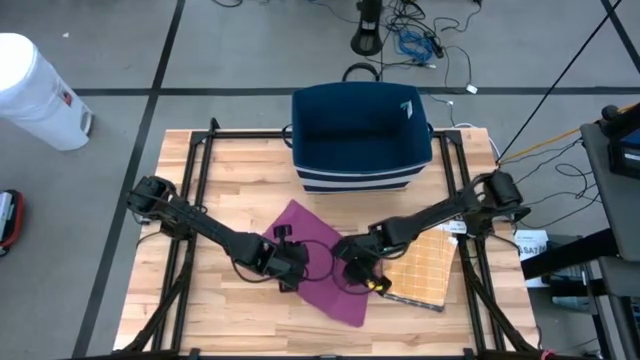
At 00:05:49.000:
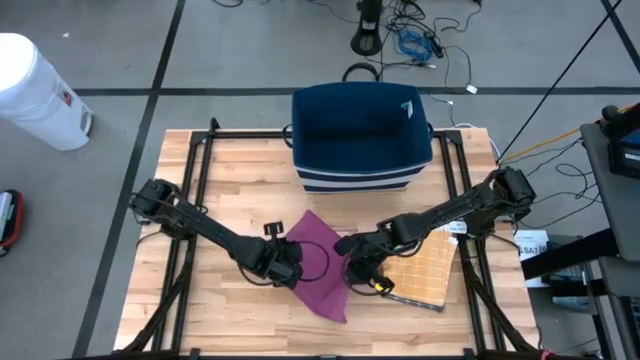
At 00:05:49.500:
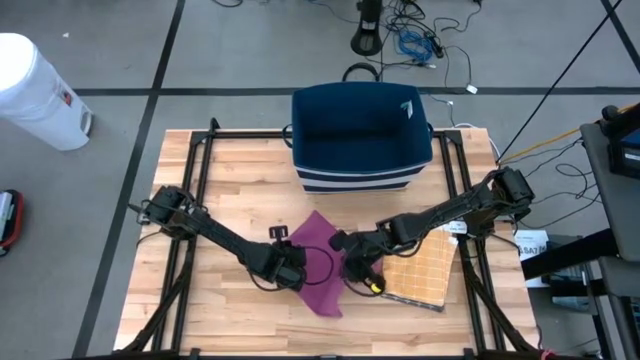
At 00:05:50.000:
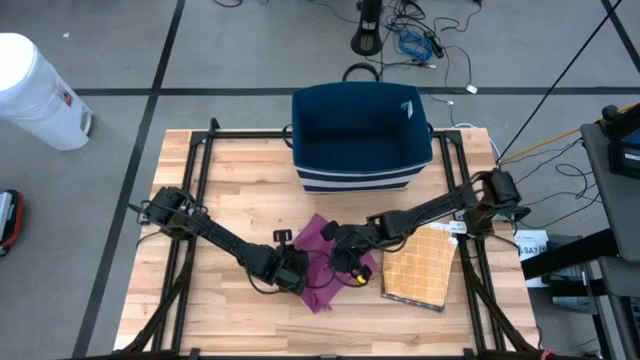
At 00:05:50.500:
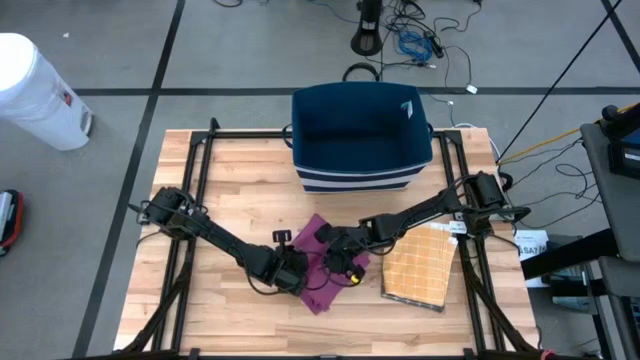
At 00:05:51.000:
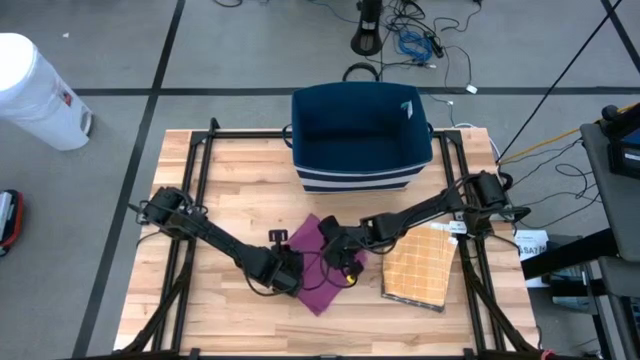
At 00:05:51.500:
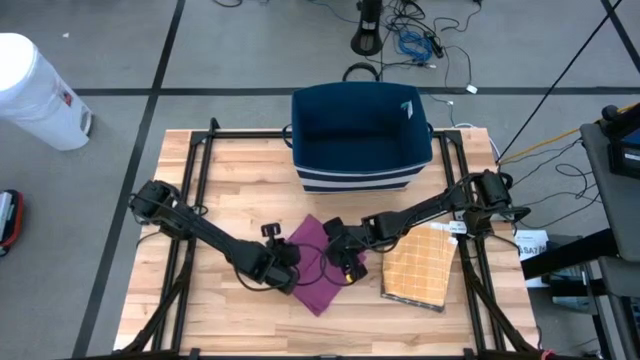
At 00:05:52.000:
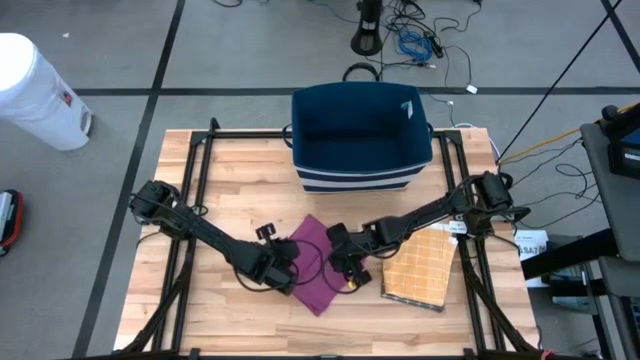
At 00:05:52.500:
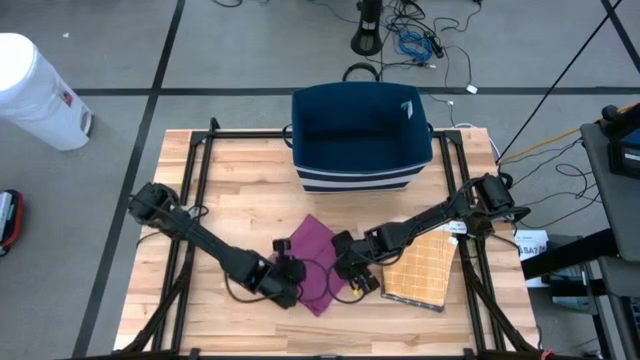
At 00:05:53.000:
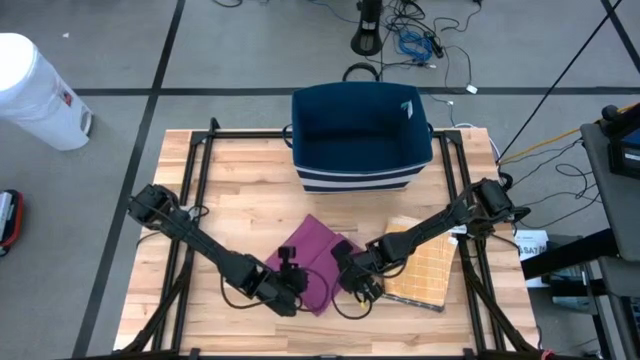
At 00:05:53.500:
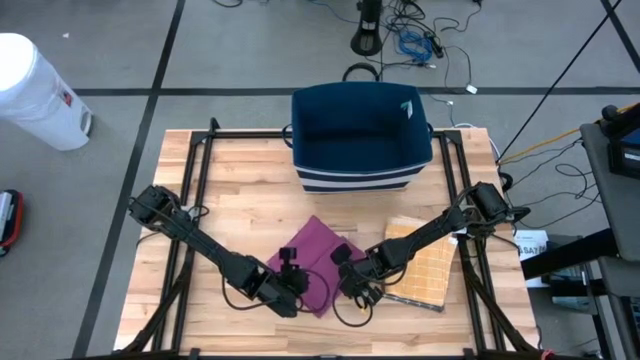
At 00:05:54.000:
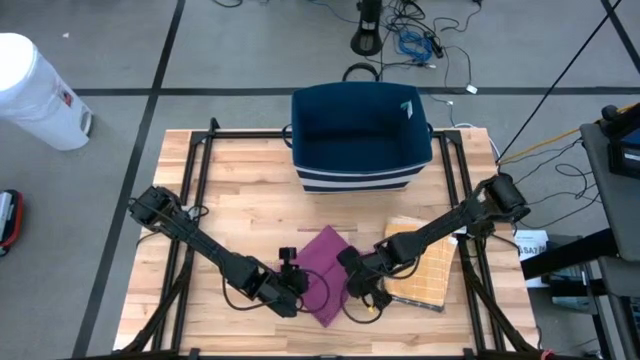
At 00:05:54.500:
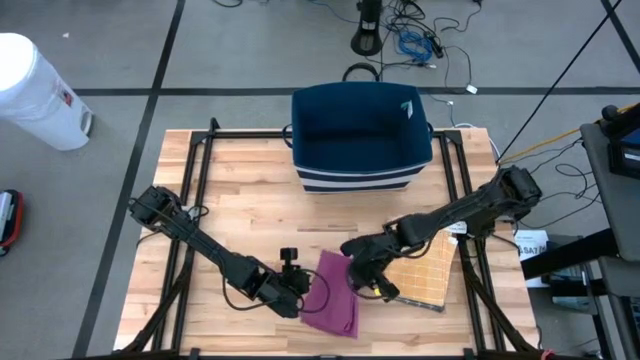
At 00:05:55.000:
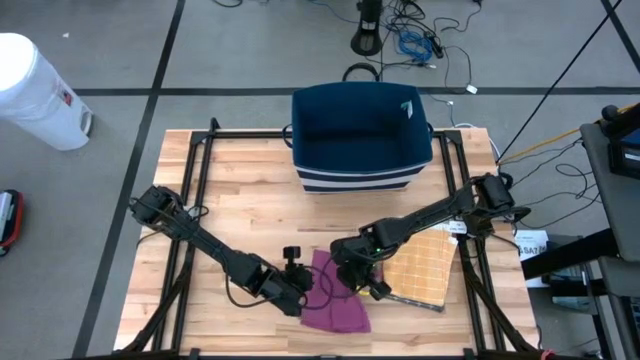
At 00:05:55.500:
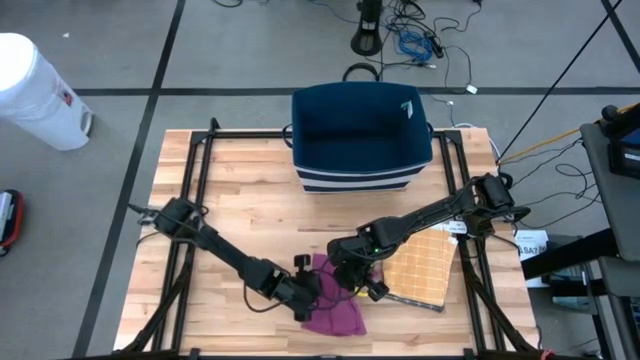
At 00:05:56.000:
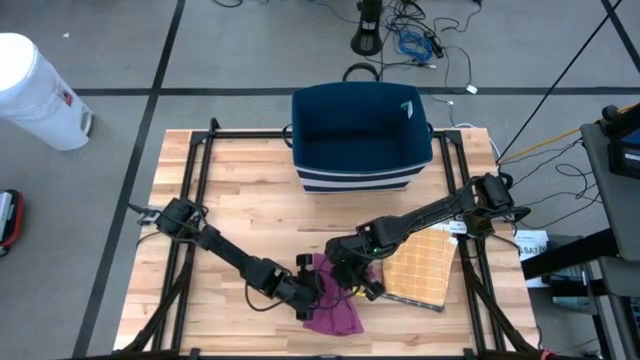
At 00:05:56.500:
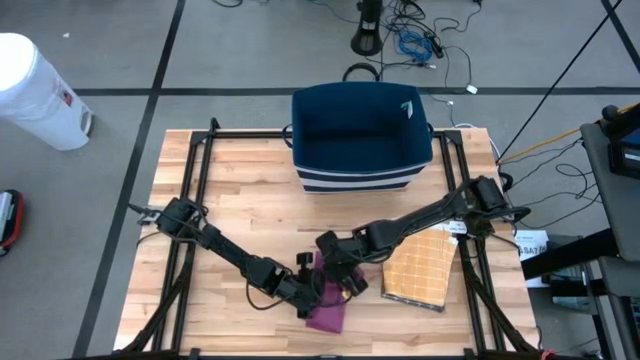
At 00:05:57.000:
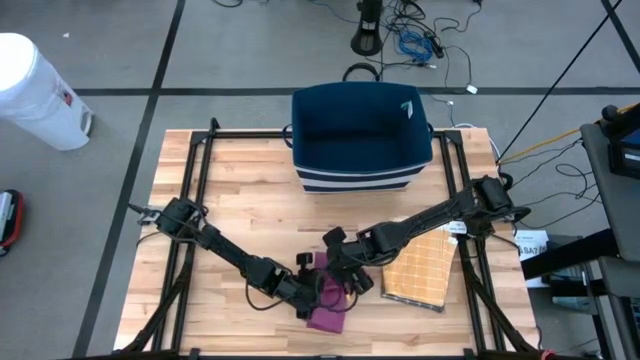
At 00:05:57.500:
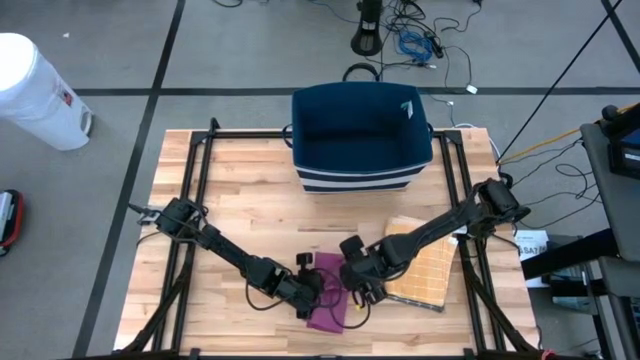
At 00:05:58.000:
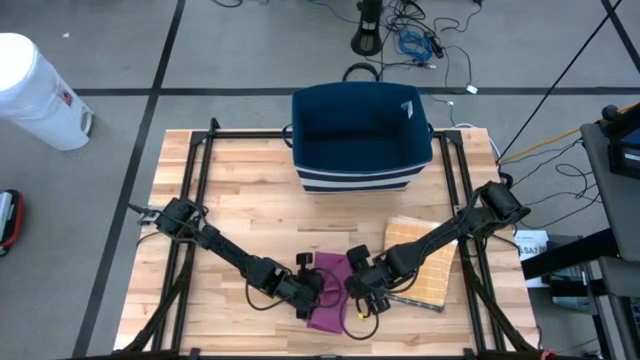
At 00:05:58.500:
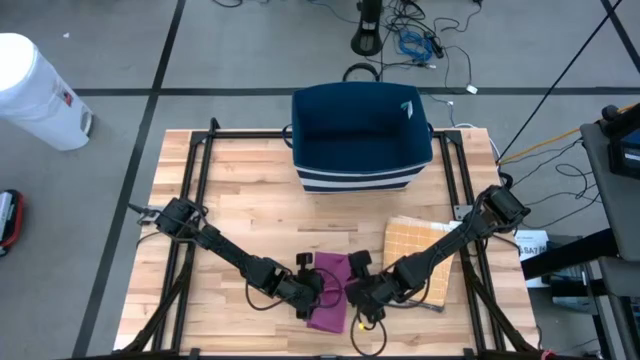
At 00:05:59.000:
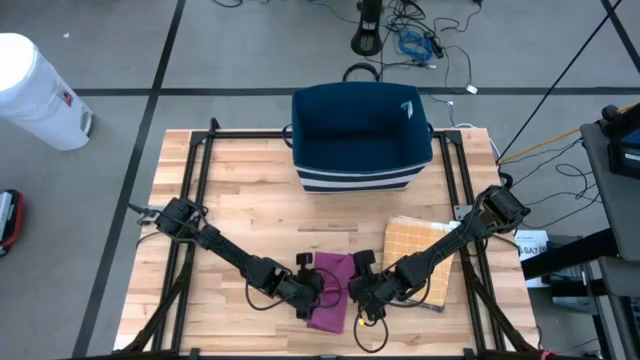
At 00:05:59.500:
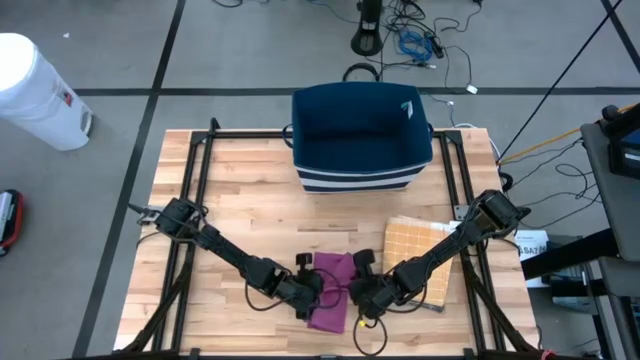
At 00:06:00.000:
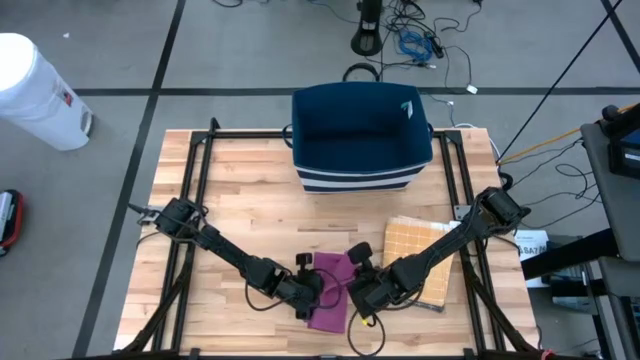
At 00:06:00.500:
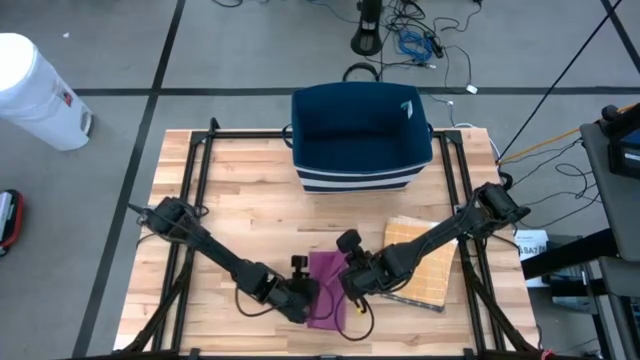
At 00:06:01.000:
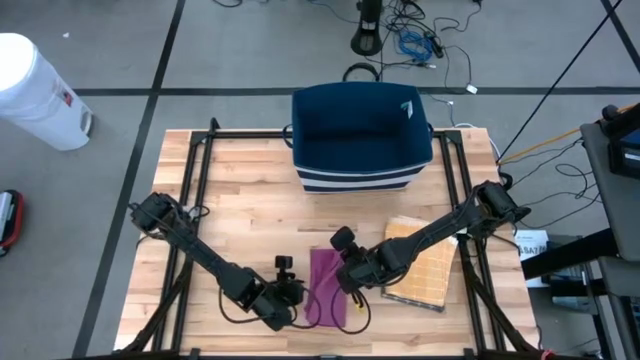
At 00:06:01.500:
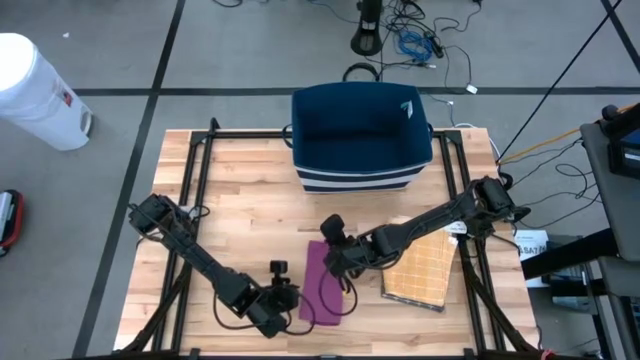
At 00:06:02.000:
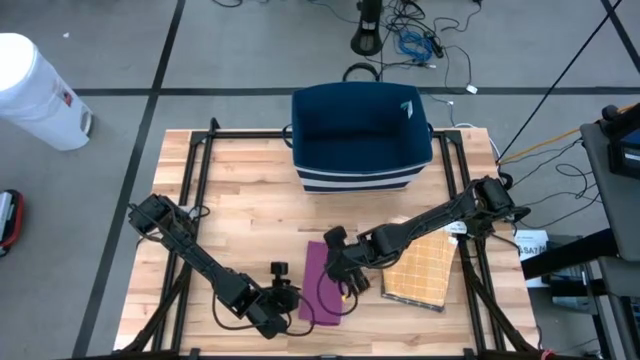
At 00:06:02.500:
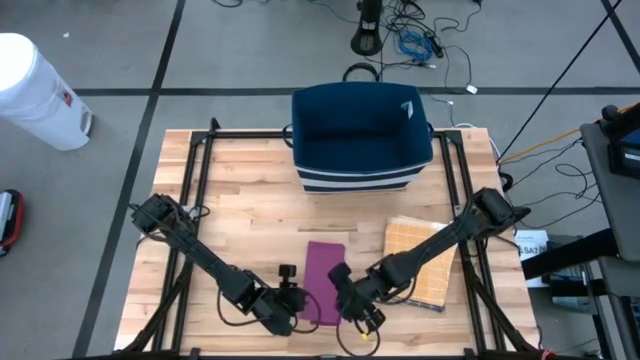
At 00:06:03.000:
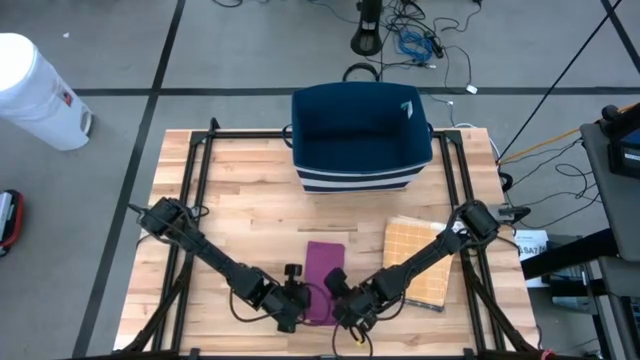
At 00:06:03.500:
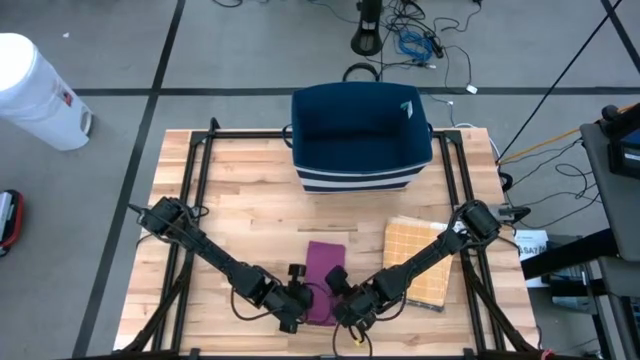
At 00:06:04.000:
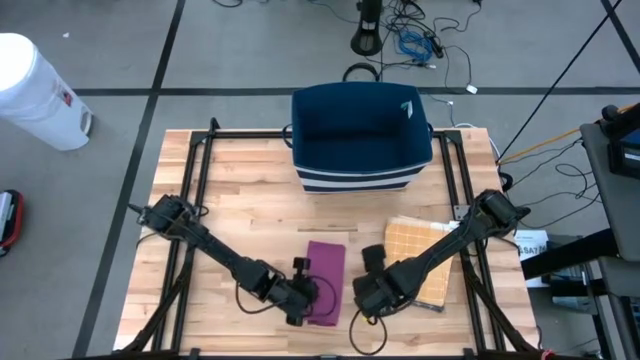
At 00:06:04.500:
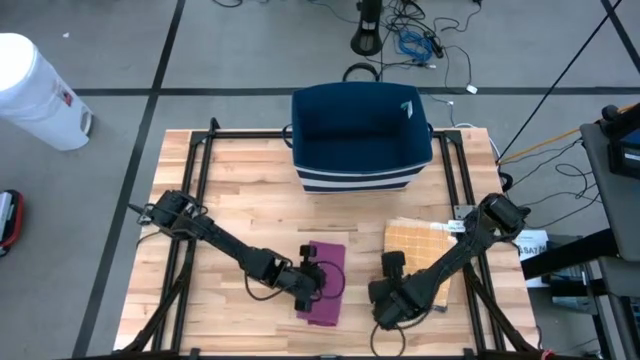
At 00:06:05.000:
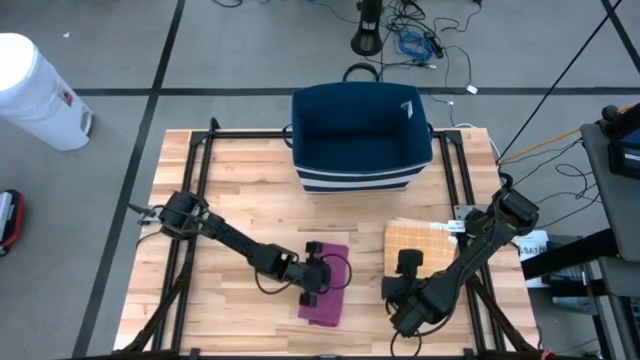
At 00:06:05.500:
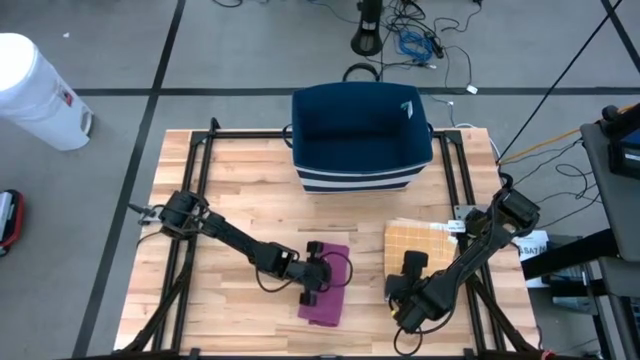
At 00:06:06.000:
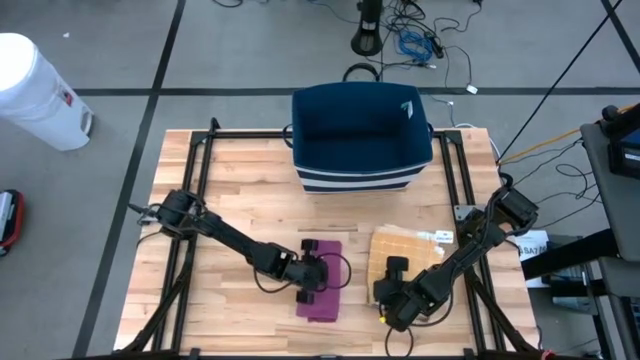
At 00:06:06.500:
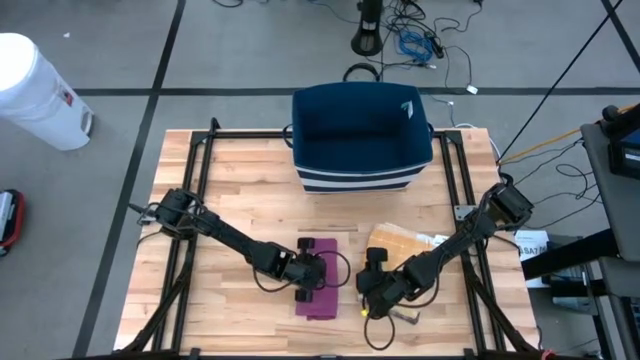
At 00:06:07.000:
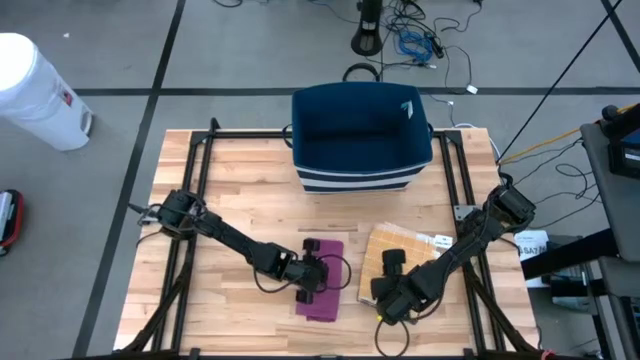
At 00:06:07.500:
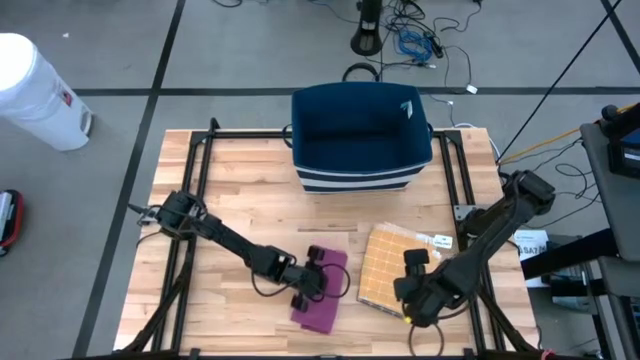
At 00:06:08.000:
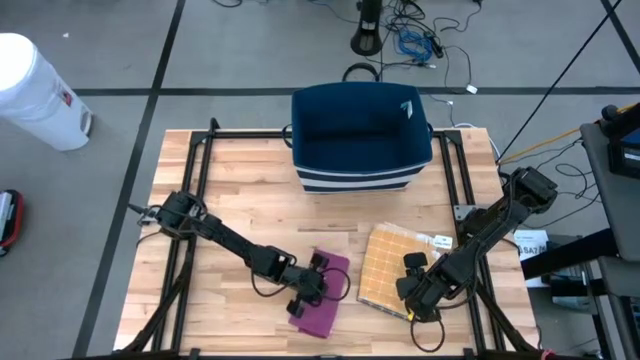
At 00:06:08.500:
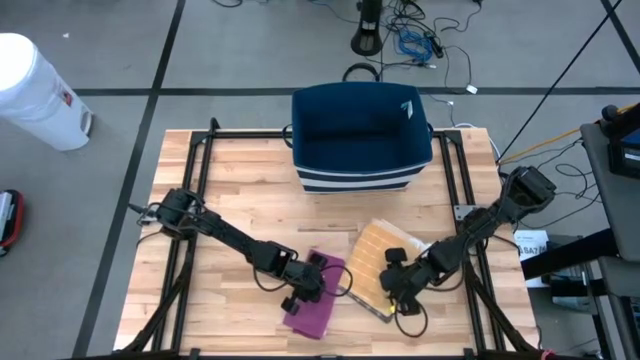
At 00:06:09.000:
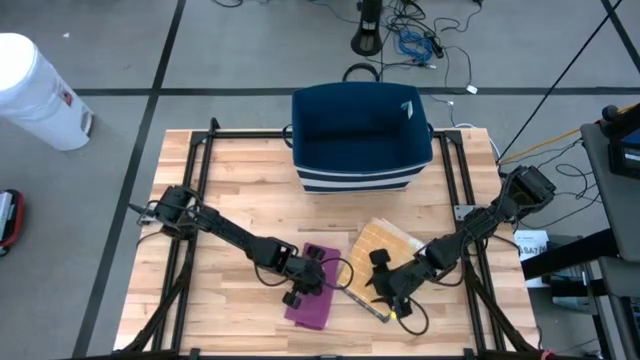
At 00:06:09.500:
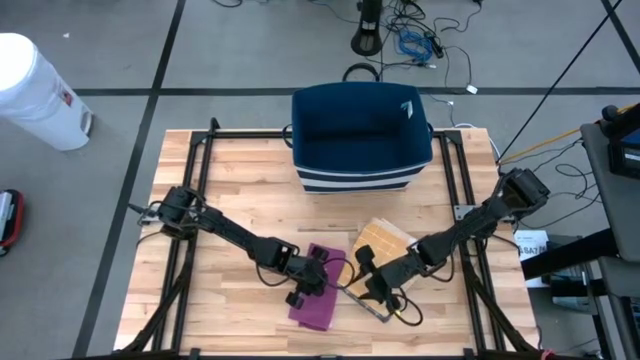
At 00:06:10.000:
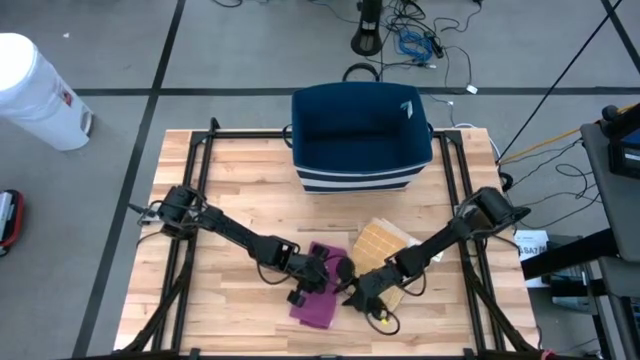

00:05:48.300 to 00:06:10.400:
Task: Fold towel
Fold the purple towel
